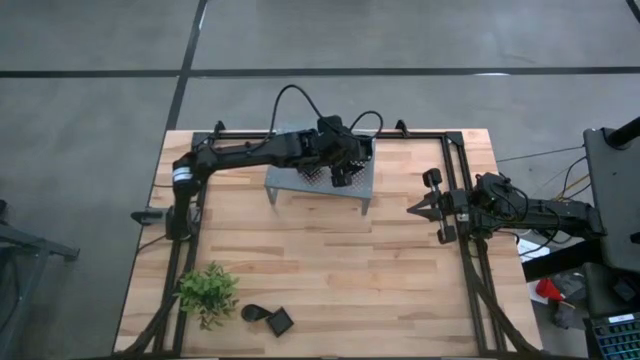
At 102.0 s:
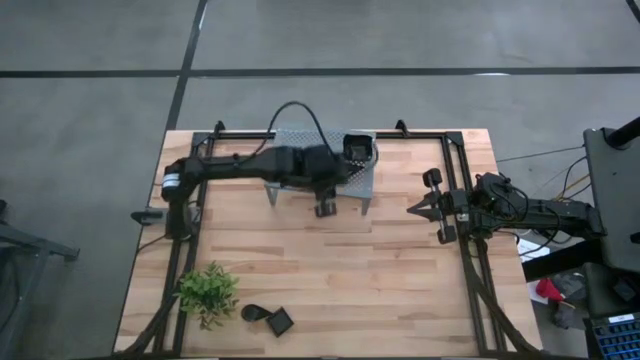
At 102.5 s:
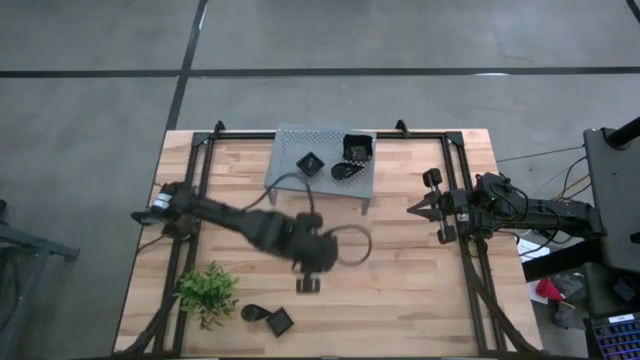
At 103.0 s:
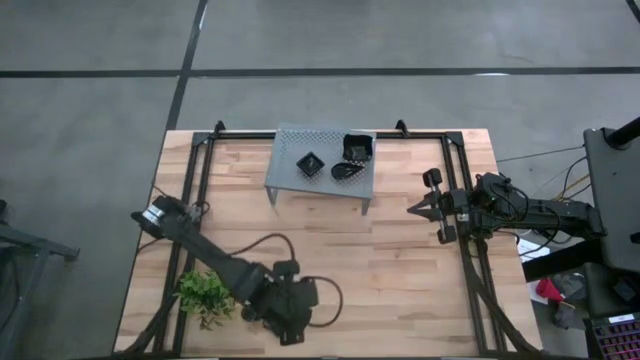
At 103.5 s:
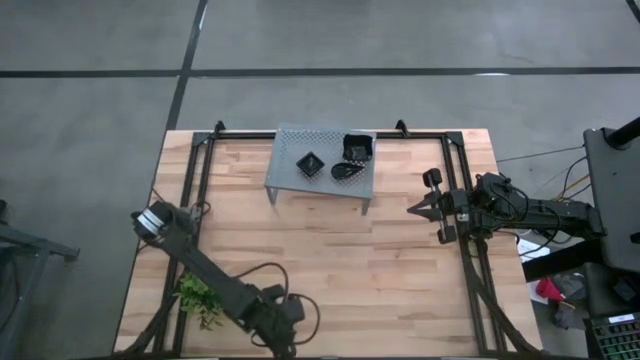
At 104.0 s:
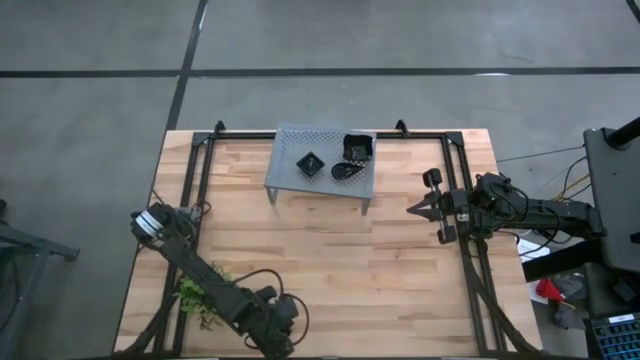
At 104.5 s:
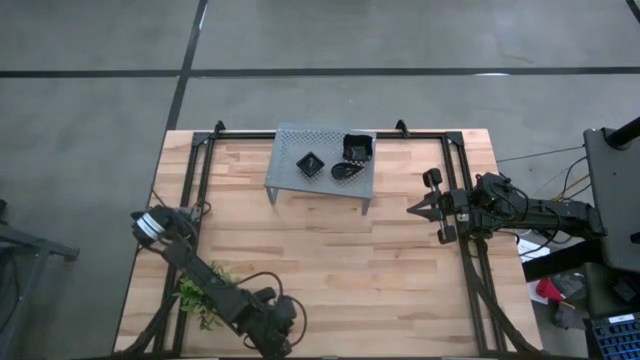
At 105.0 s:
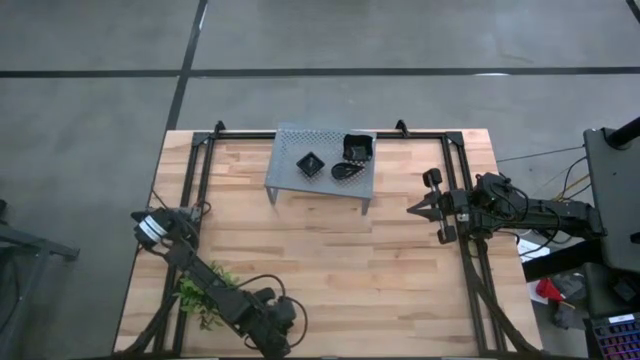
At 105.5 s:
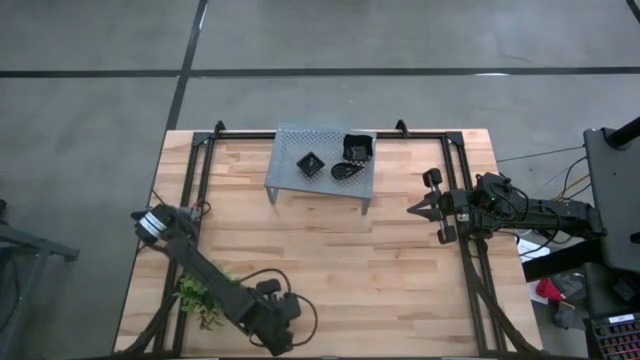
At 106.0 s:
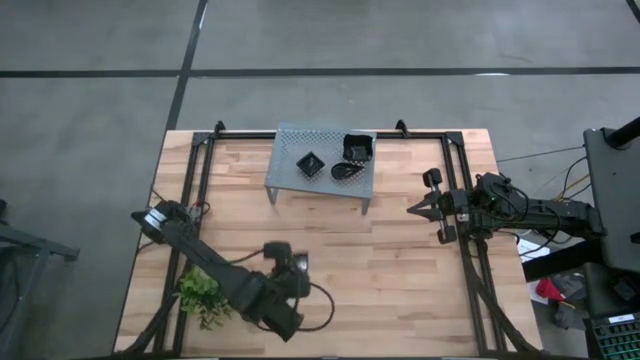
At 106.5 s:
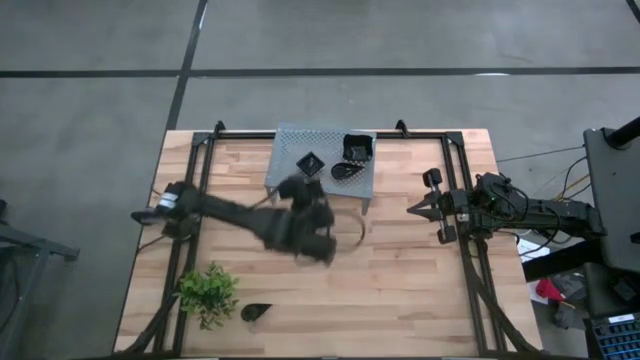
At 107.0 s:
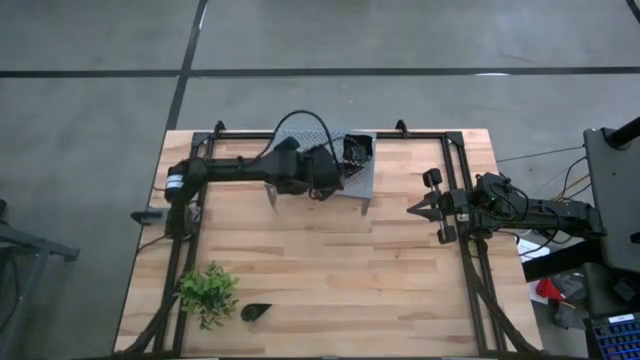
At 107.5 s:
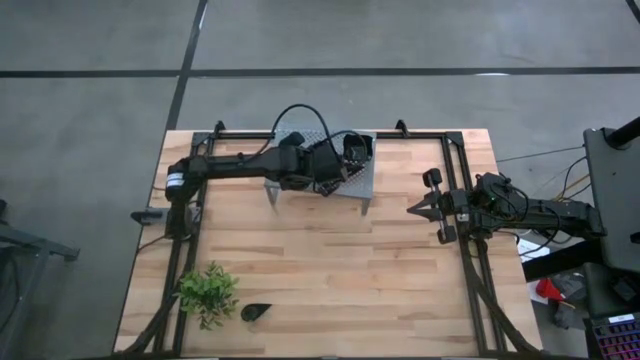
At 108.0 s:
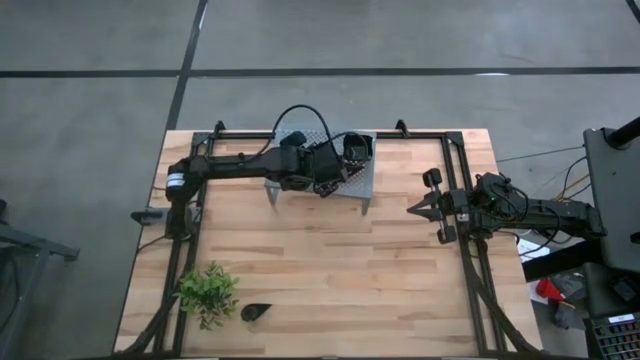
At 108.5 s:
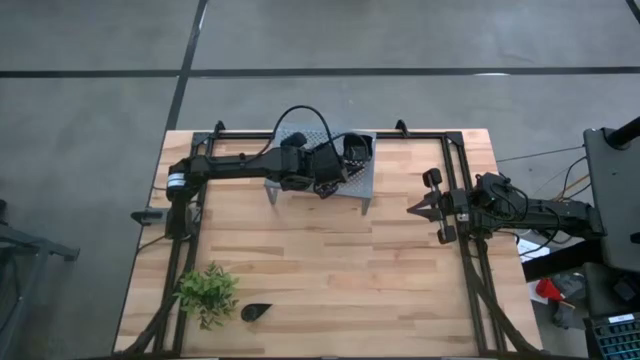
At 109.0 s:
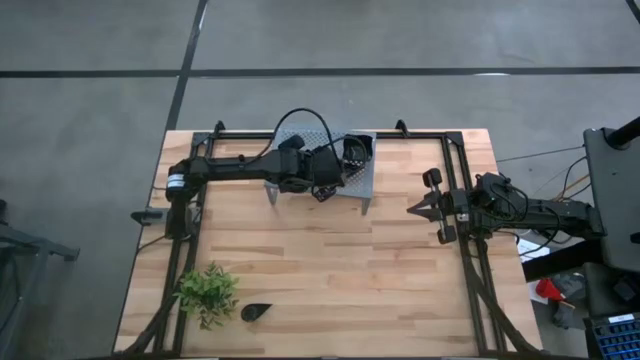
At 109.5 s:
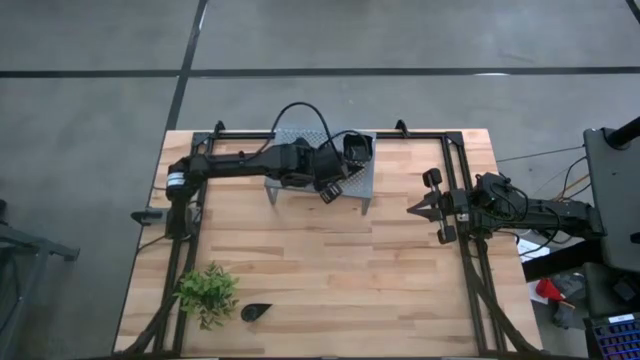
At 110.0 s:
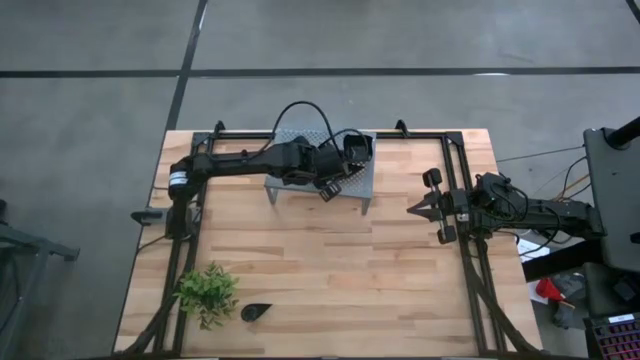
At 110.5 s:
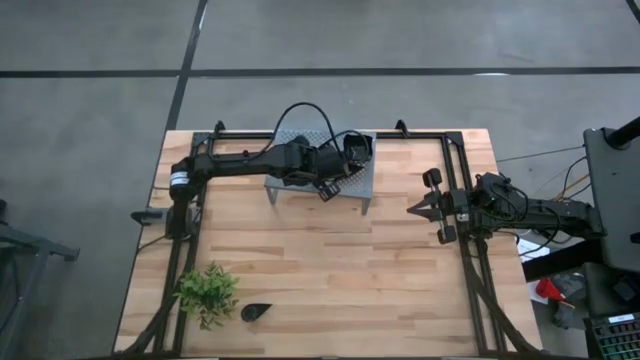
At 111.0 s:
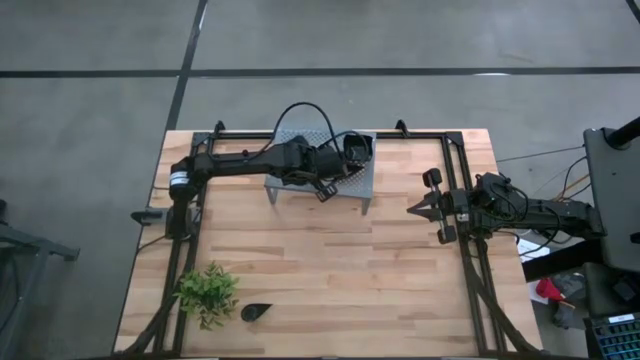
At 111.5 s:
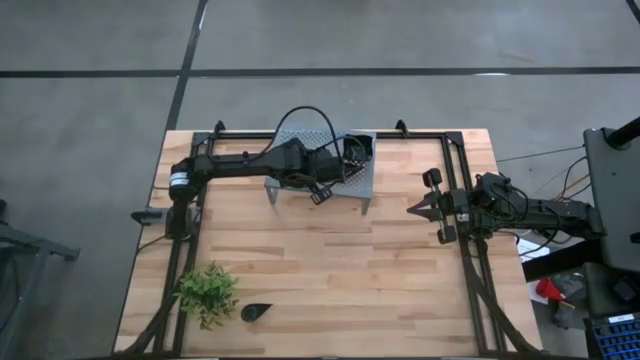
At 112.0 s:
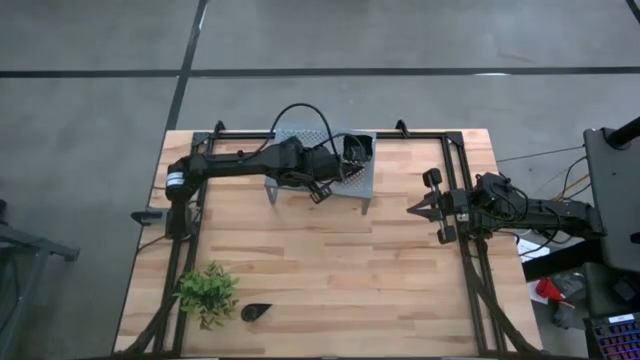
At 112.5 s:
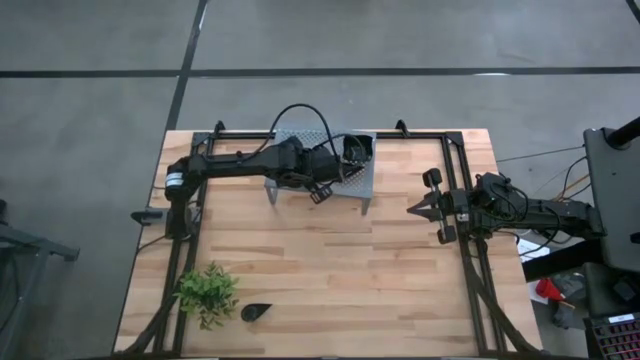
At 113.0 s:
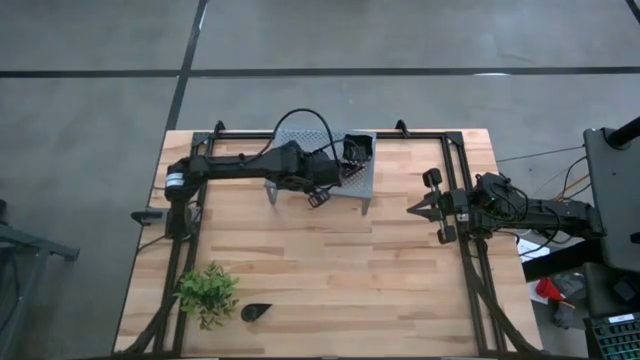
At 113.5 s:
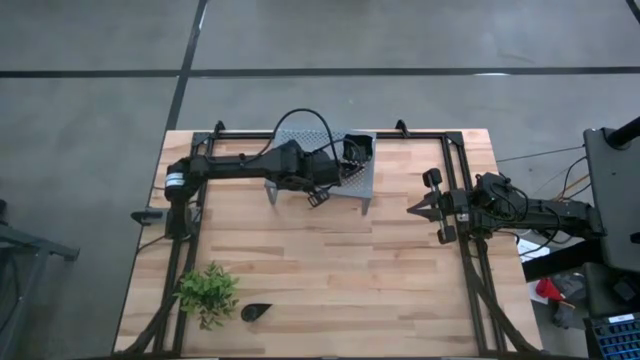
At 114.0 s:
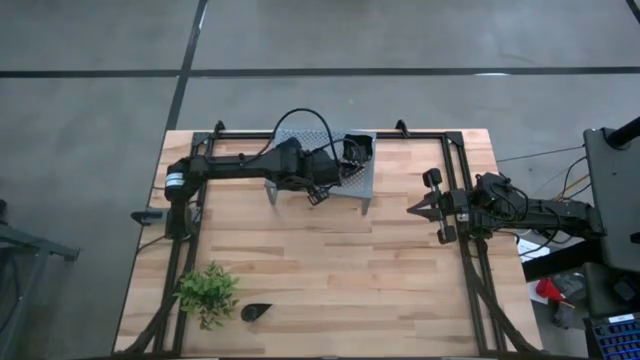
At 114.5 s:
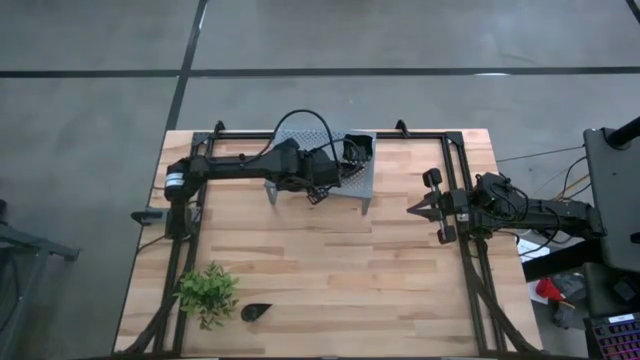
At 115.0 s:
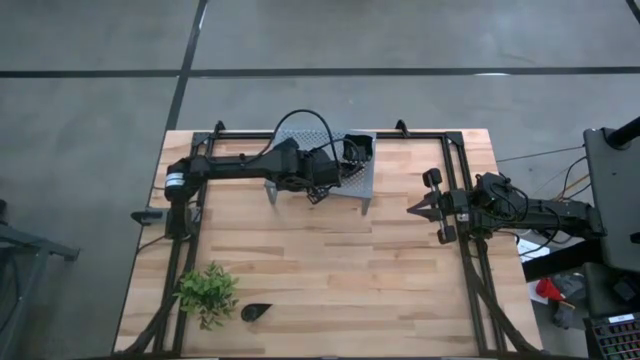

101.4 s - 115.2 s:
Task: Pick & Place Mini shaped plates
Stack the black square plate on top of the other black square plate on the shelf

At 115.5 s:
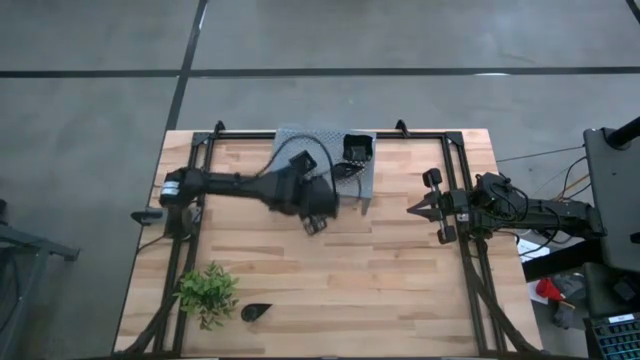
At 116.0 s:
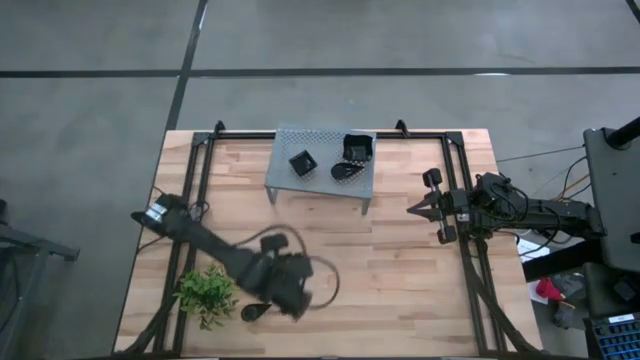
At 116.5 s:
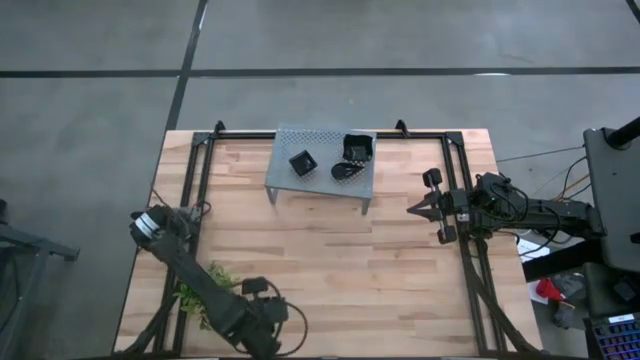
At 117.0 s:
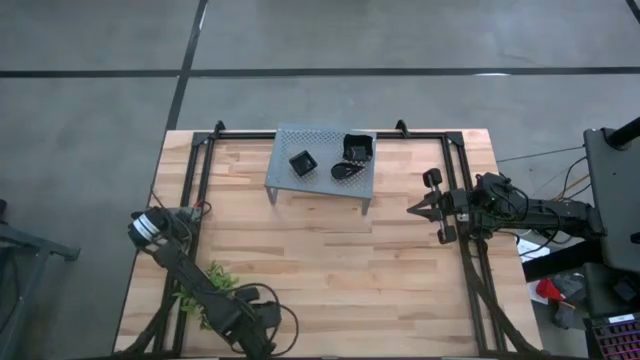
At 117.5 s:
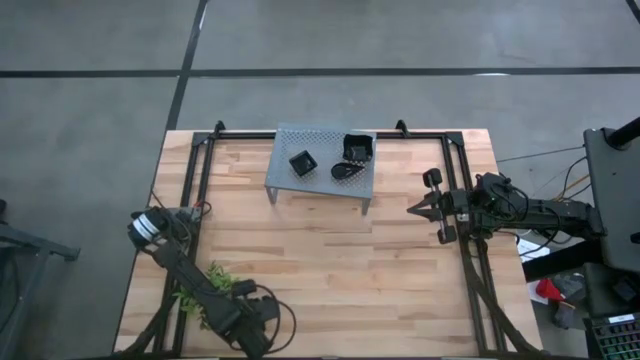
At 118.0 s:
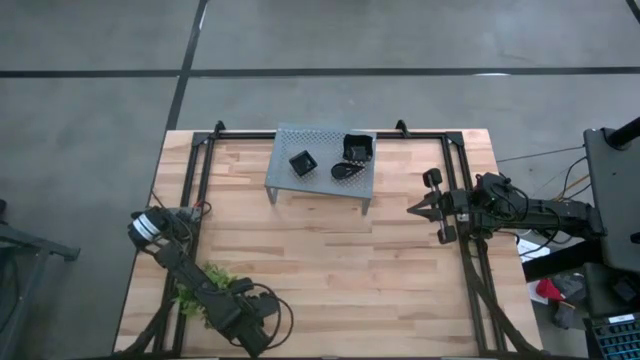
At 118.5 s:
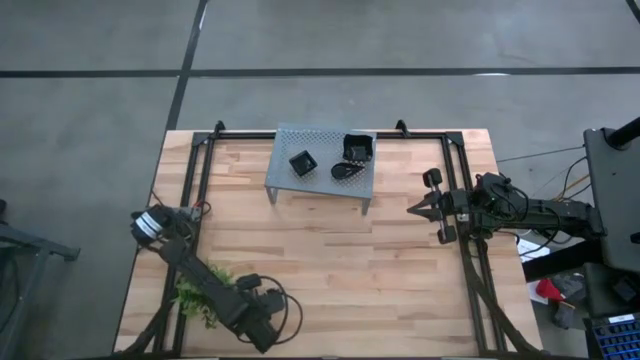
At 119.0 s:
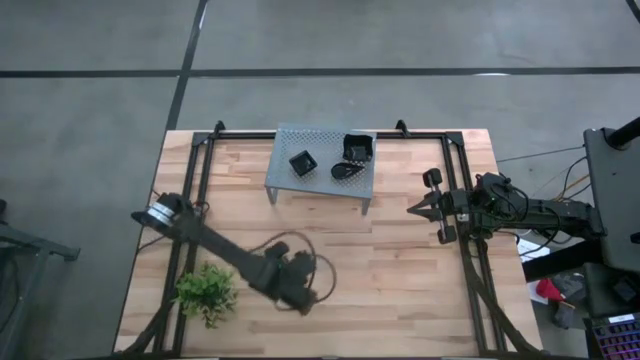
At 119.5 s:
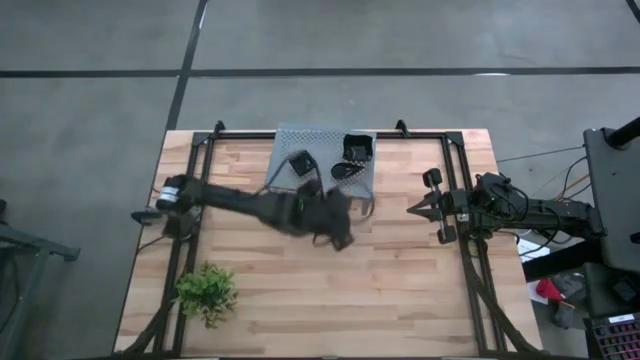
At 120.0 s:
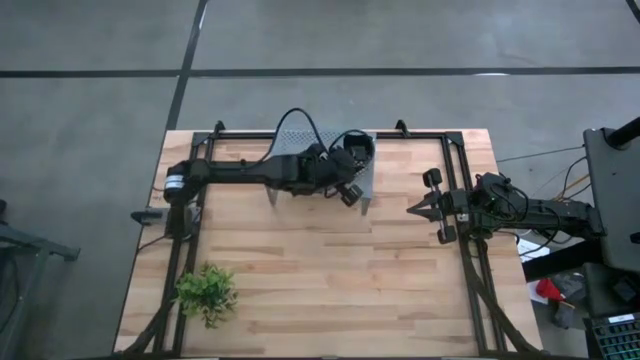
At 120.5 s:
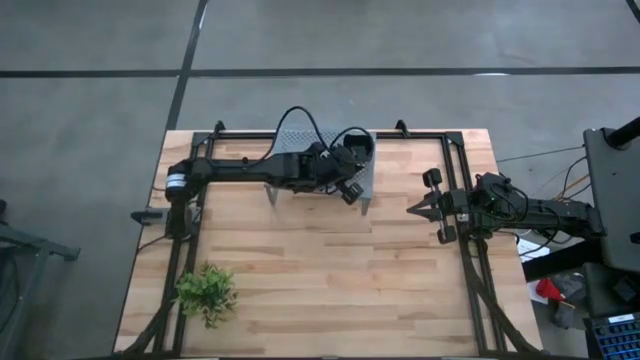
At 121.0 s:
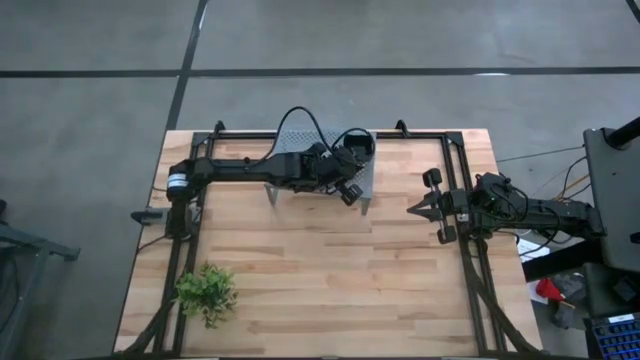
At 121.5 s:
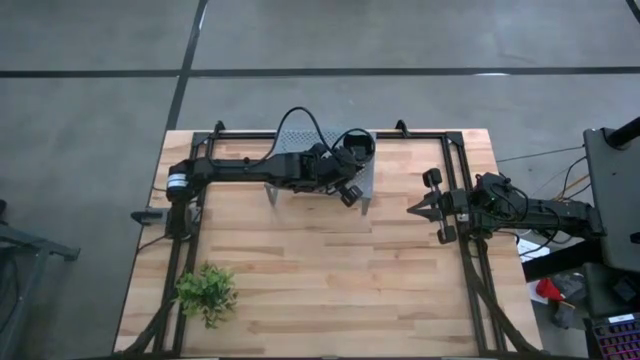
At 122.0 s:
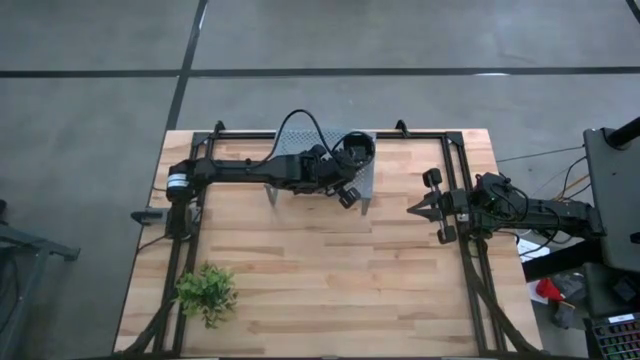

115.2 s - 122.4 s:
Stack the black drop shaped plate on top of the other black drop shaped plate on the shelf
